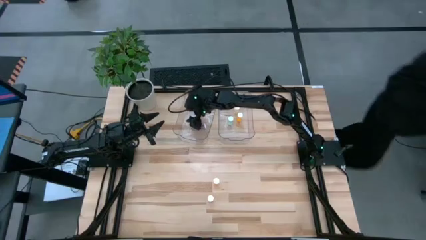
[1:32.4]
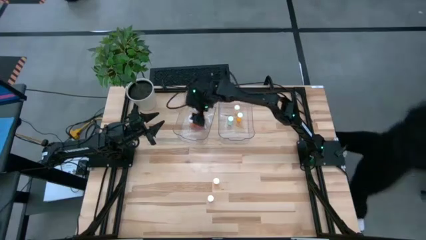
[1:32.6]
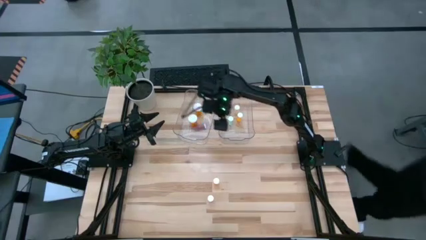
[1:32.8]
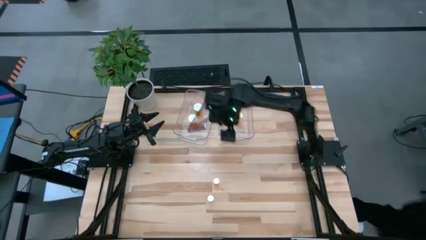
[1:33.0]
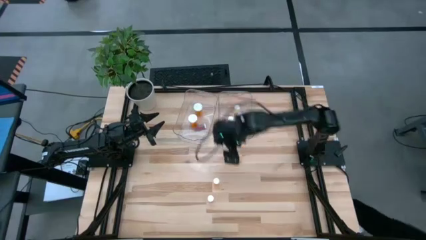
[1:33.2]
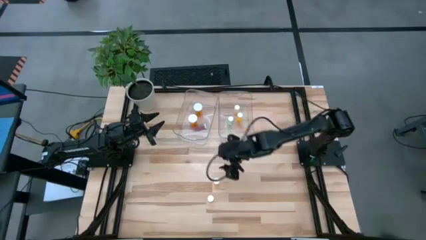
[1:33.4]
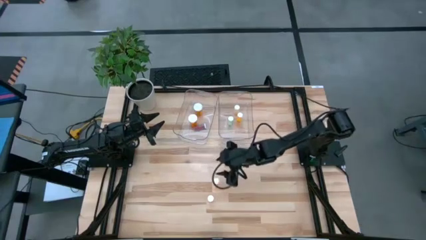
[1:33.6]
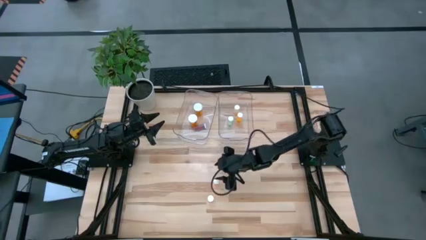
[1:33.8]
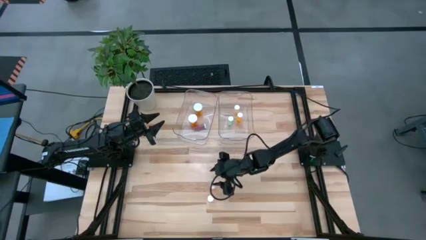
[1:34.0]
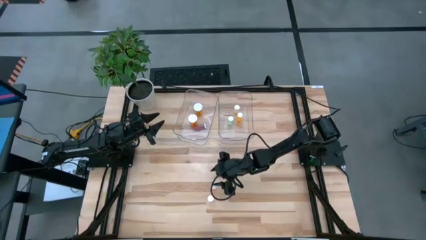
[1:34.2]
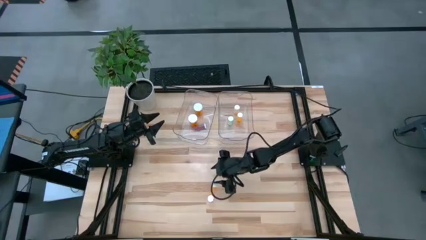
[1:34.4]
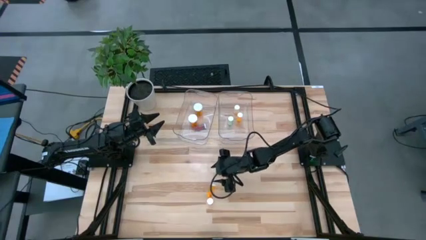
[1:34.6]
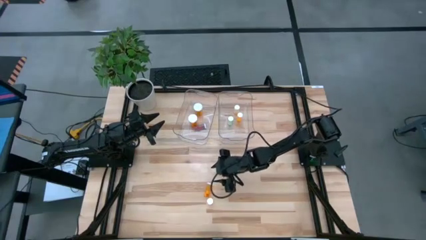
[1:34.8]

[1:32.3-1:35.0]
Task: Pick and place medicine bottles into bin by pill shape (circle, oval)
Put the small orange capsule bottle into the left transparent bin

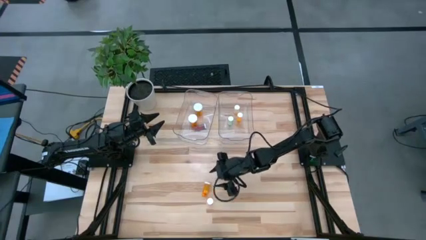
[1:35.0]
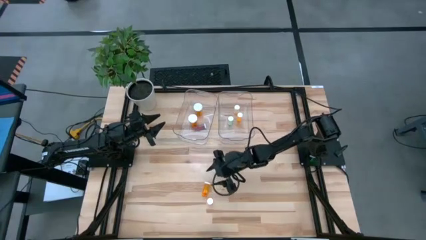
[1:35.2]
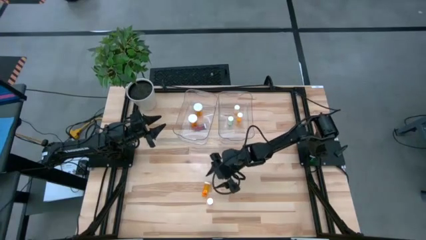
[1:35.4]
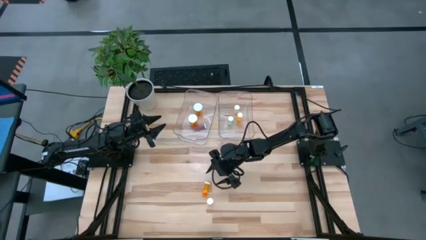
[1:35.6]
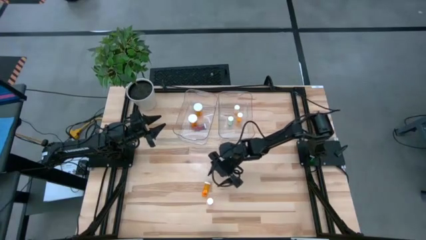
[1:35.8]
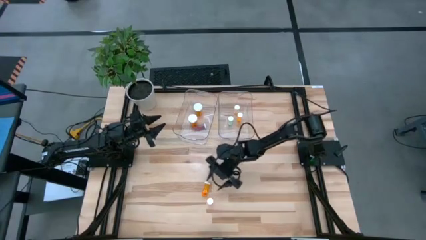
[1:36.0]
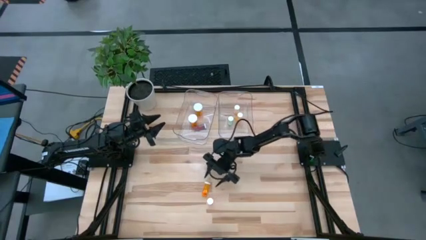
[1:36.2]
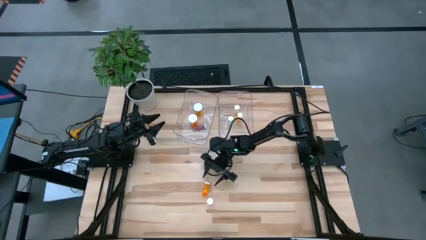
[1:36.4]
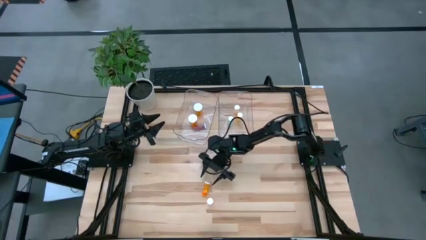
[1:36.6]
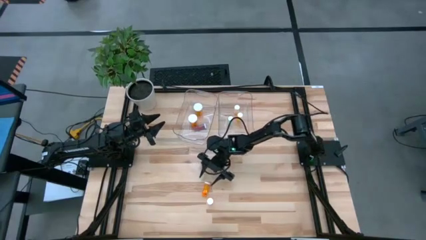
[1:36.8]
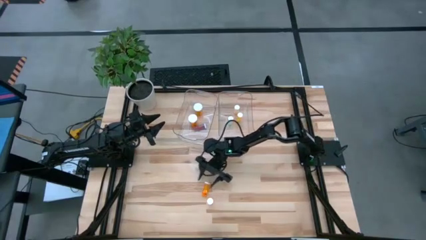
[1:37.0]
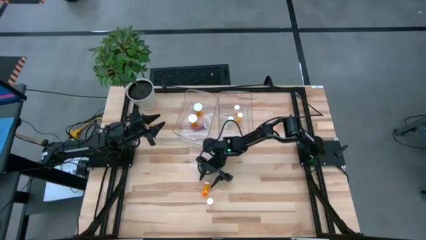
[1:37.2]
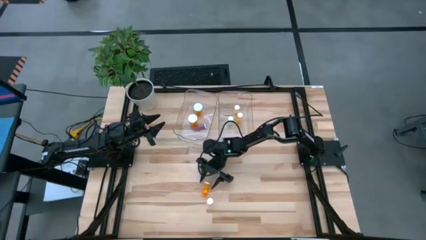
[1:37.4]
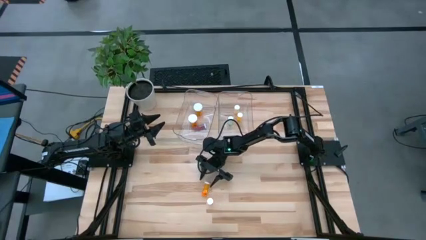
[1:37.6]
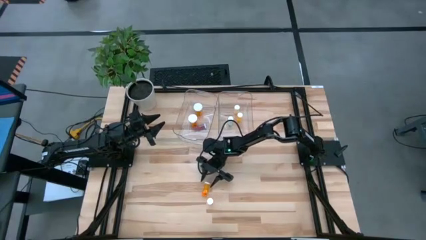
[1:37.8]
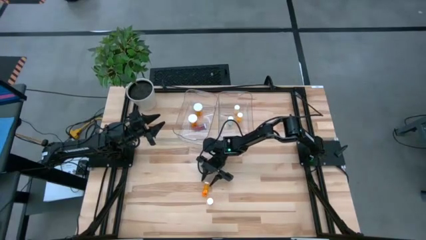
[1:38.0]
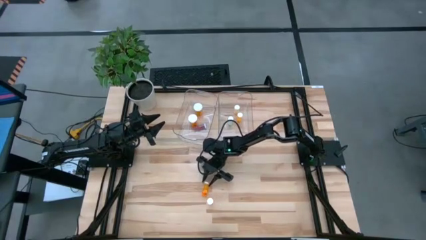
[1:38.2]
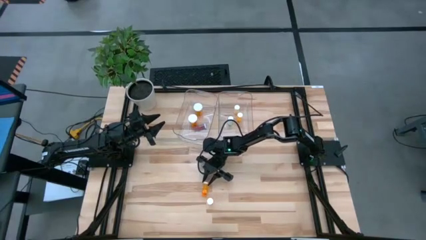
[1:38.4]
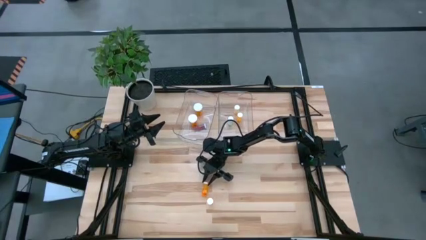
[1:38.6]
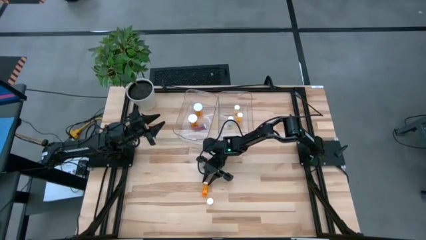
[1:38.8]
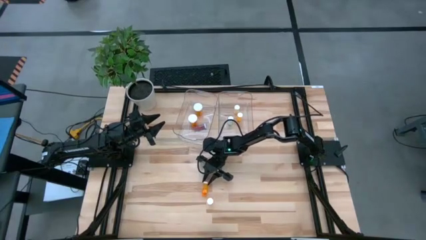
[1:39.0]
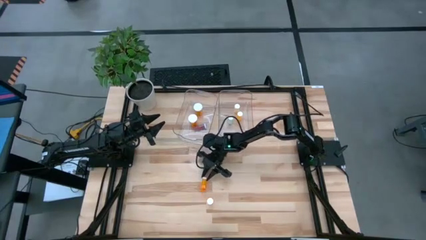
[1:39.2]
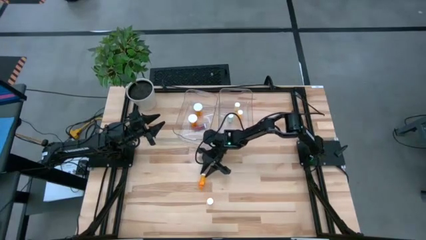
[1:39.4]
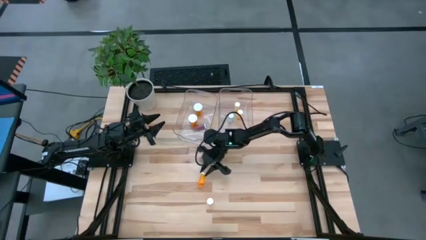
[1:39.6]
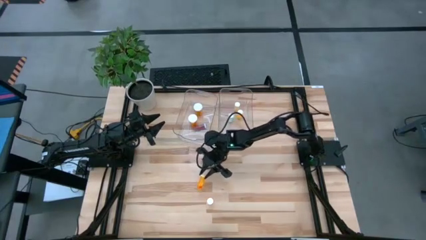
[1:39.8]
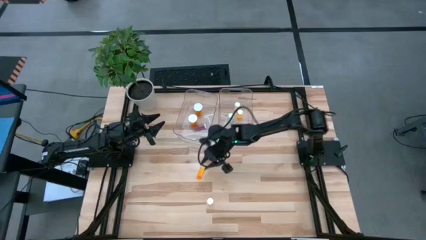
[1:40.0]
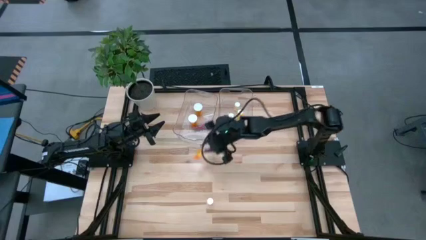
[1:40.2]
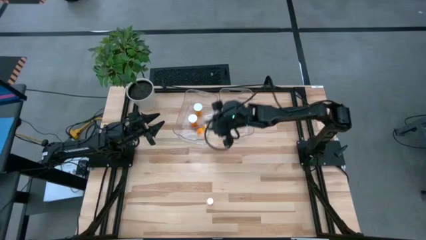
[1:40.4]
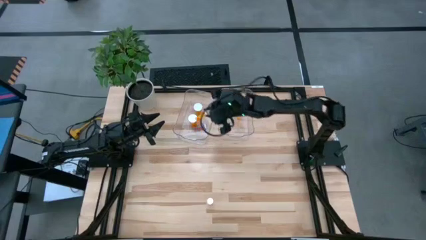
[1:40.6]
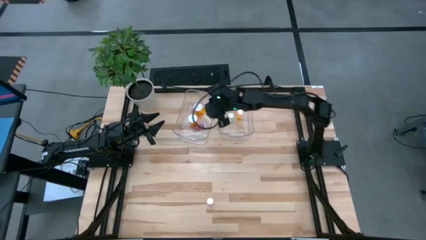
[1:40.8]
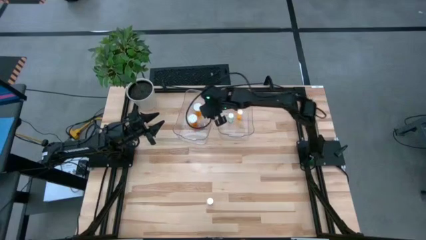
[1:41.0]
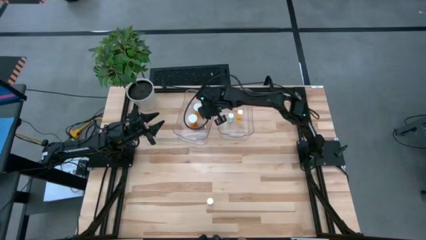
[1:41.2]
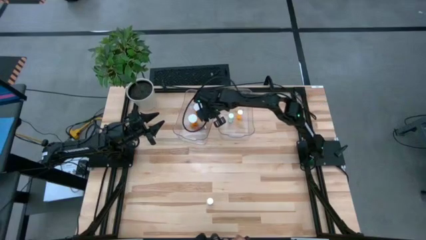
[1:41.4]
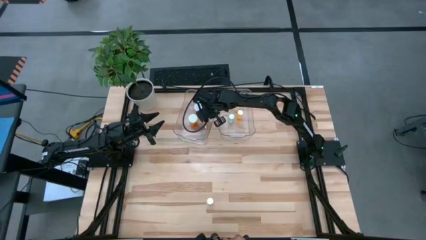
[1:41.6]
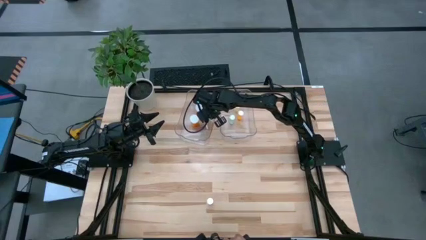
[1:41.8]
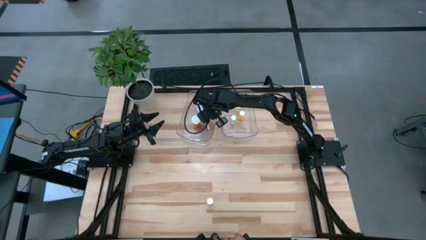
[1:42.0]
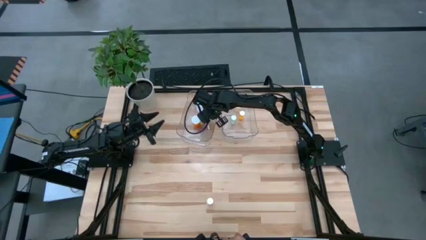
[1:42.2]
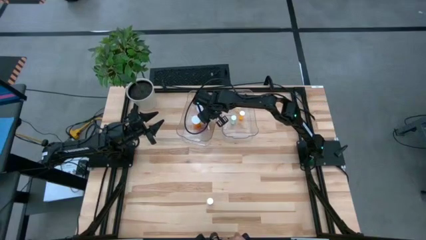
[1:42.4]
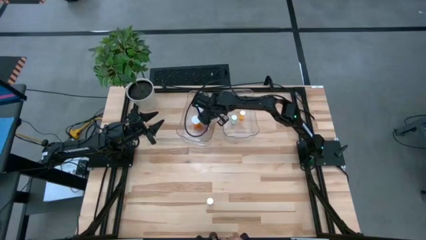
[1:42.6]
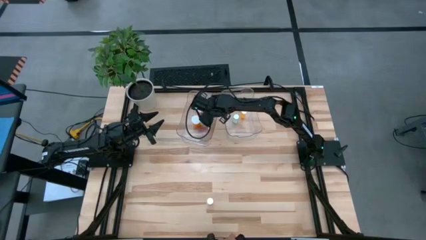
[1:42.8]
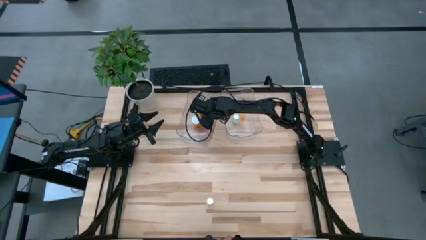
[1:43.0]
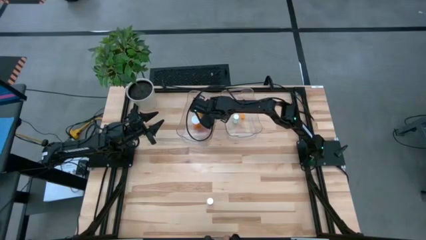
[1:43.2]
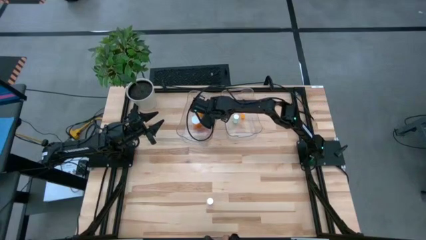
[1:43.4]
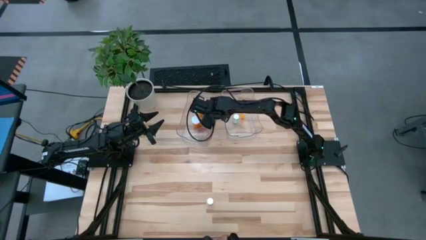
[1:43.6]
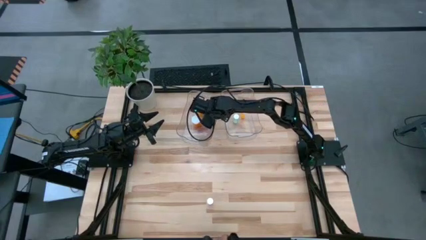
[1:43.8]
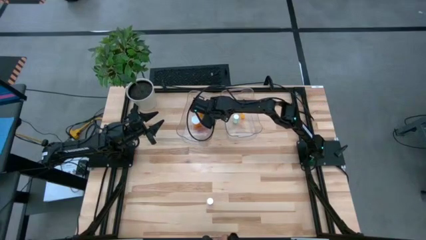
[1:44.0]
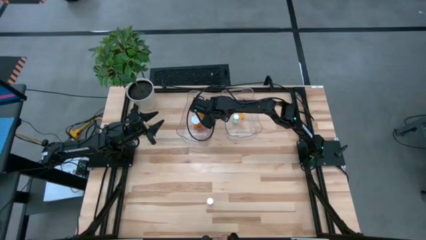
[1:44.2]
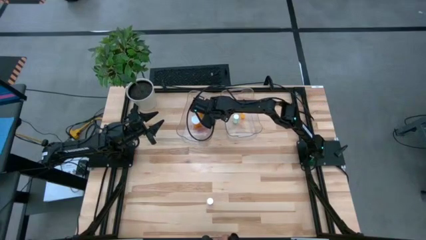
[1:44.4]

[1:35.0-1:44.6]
Put the small orange capsule bottle into the left transparent bin

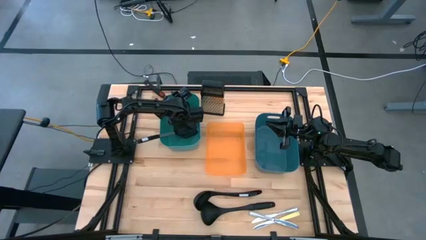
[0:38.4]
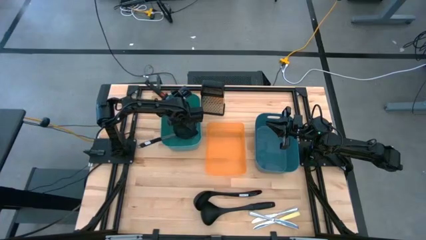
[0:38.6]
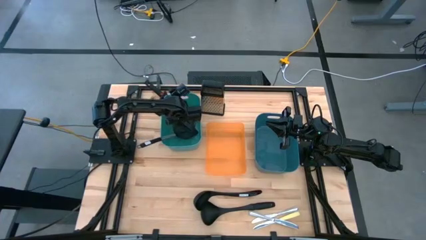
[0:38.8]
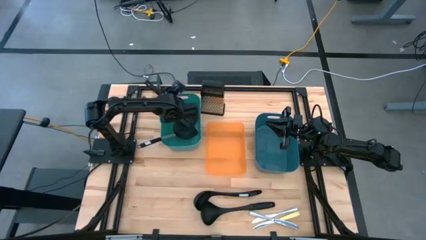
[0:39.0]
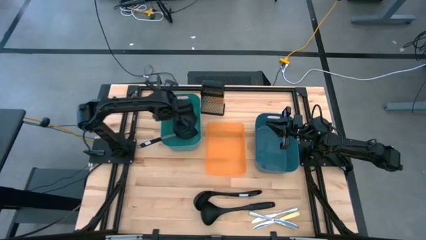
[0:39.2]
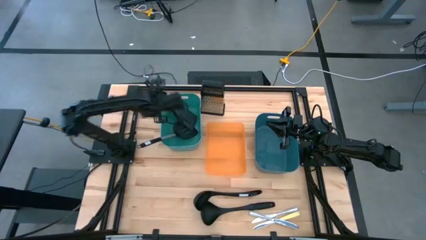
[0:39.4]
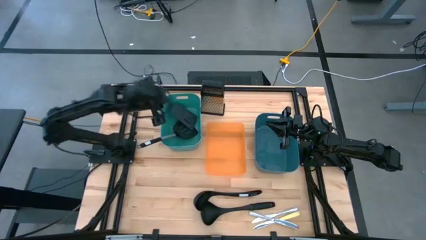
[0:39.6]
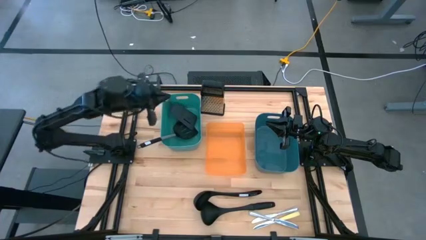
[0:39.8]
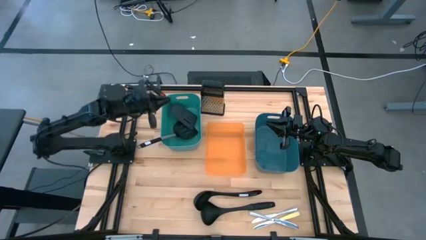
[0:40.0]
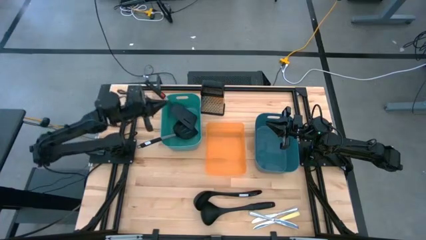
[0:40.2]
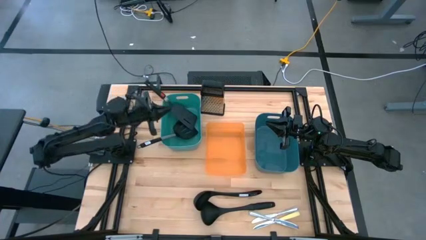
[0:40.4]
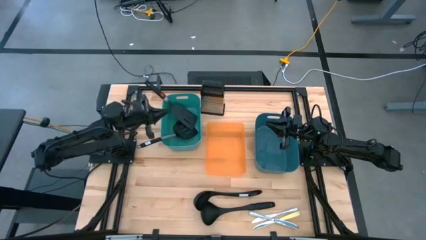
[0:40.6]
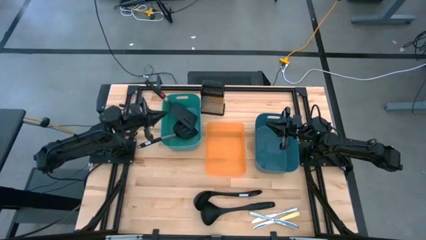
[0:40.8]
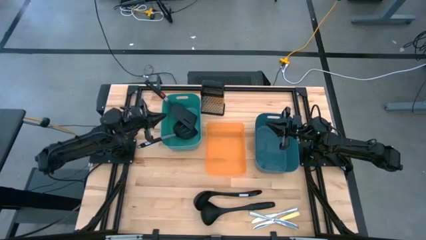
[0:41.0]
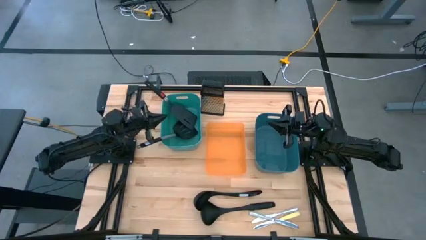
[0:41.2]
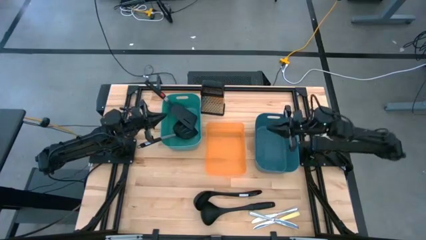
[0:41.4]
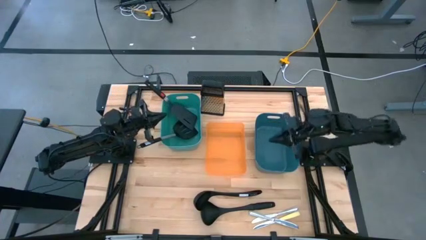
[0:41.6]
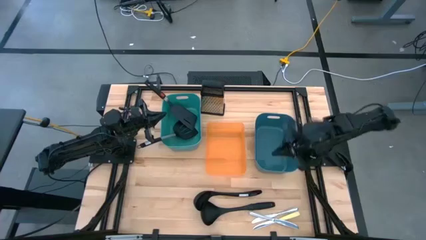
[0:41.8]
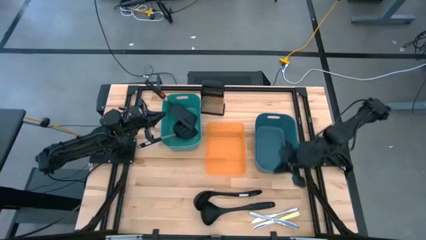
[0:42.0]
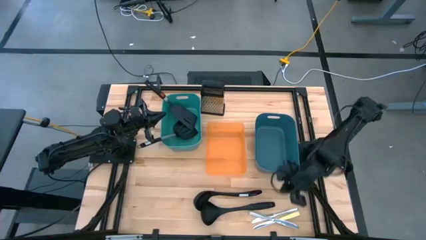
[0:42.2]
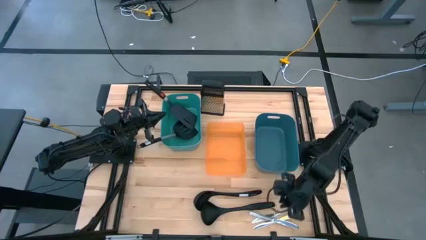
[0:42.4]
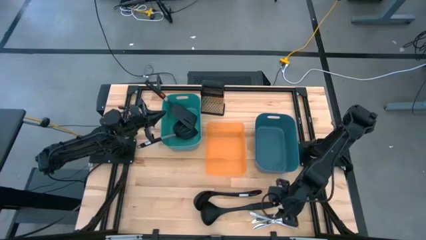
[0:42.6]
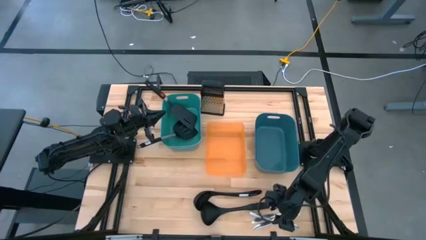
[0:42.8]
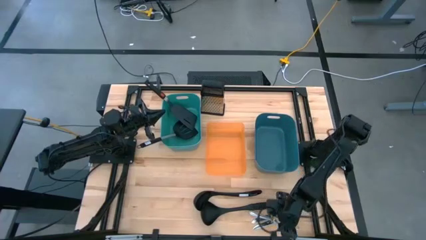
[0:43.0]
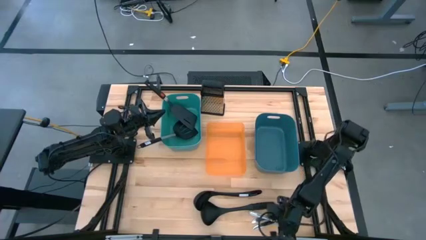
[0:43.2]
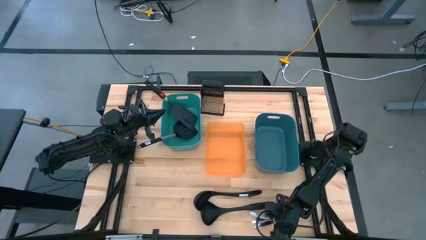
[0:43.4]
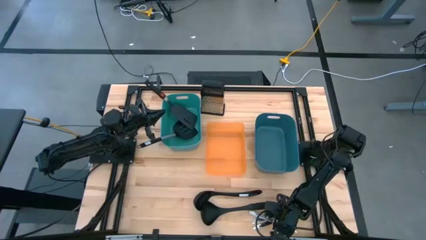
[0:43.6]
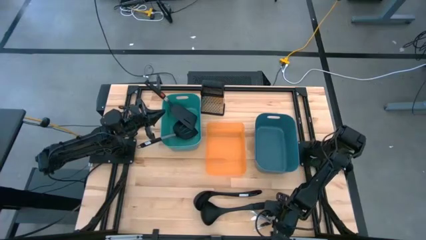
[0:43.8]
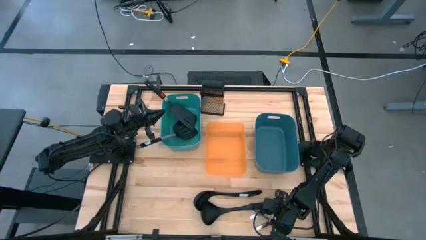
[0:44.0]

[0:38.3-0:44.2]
Task: Pick & Place Kitchen Items
Adjust the top silver table knife
